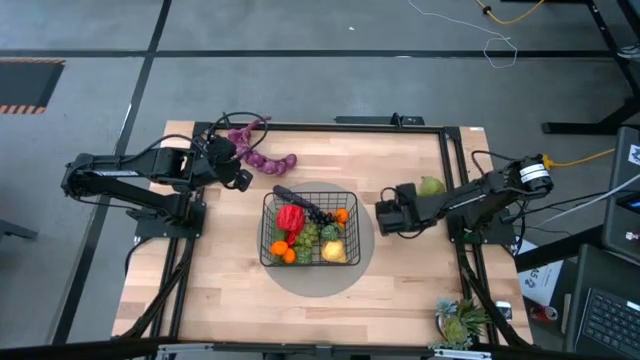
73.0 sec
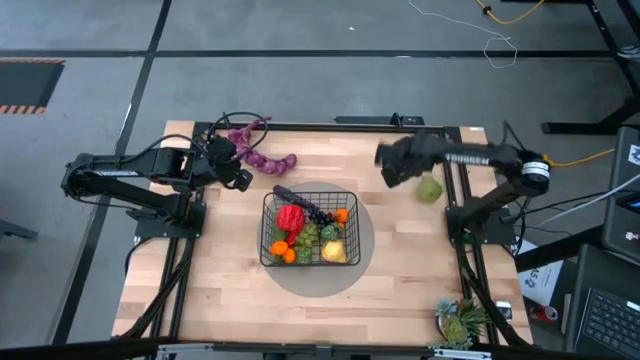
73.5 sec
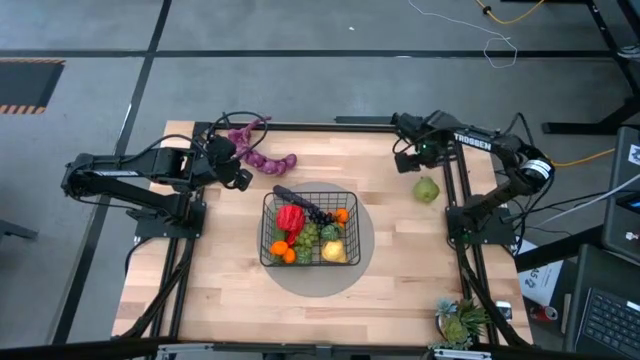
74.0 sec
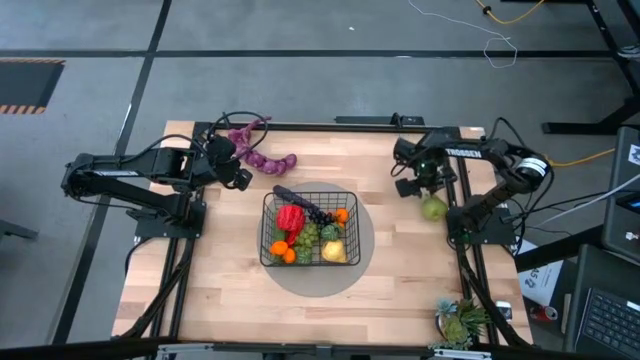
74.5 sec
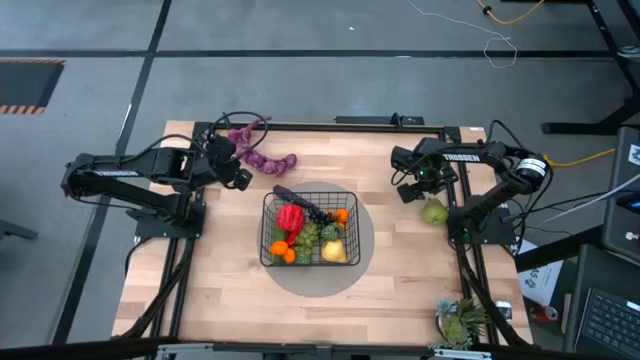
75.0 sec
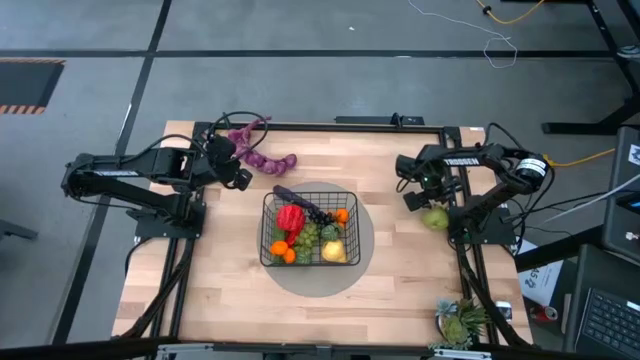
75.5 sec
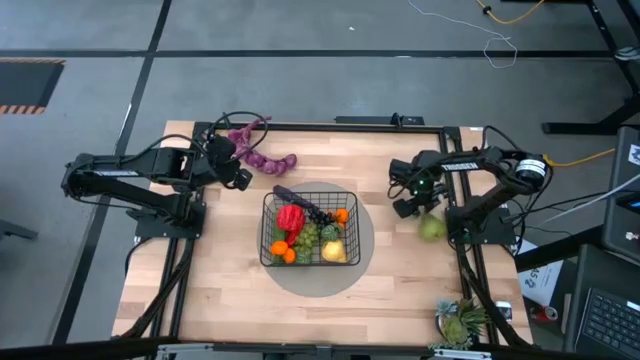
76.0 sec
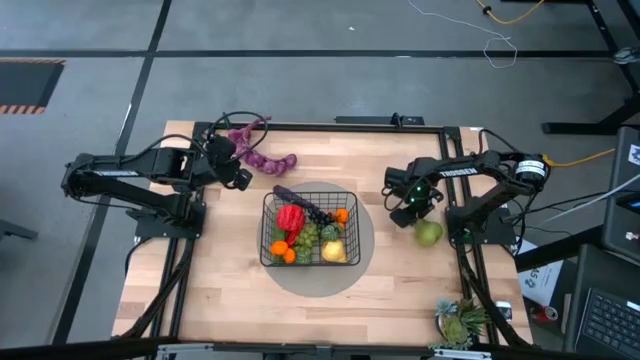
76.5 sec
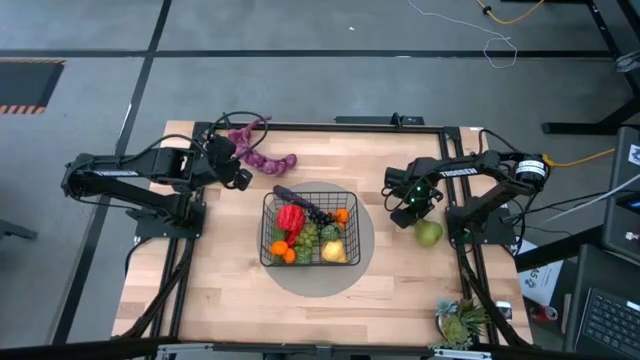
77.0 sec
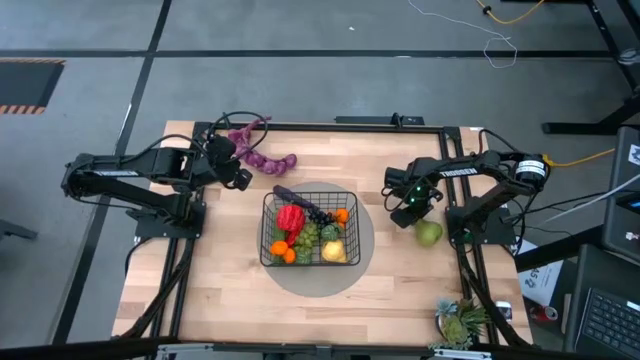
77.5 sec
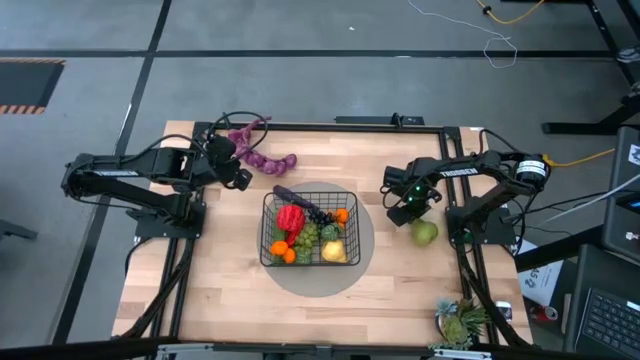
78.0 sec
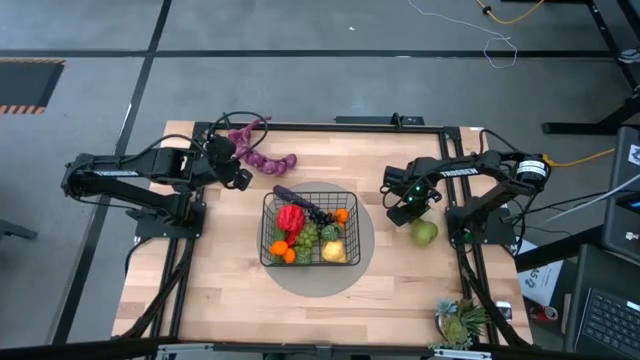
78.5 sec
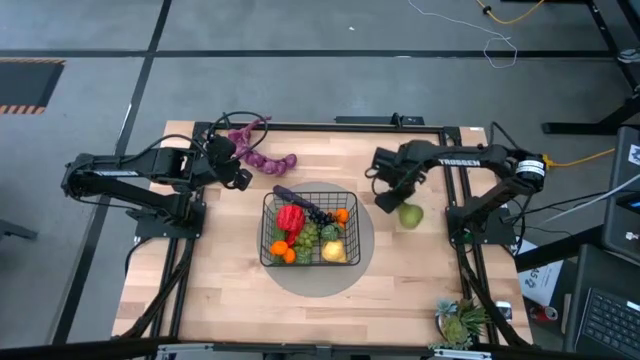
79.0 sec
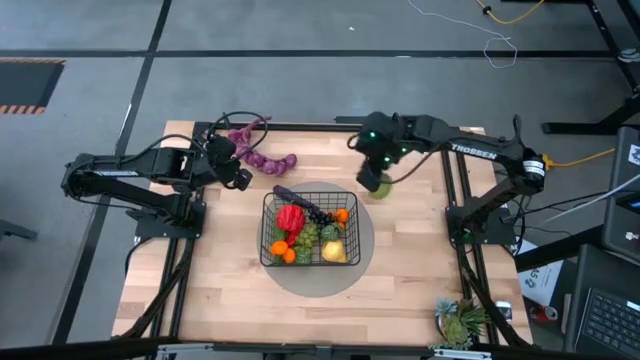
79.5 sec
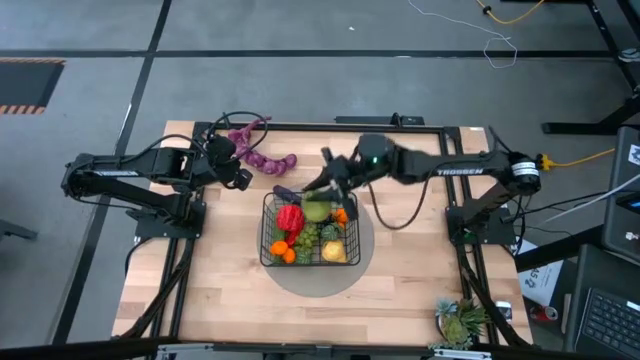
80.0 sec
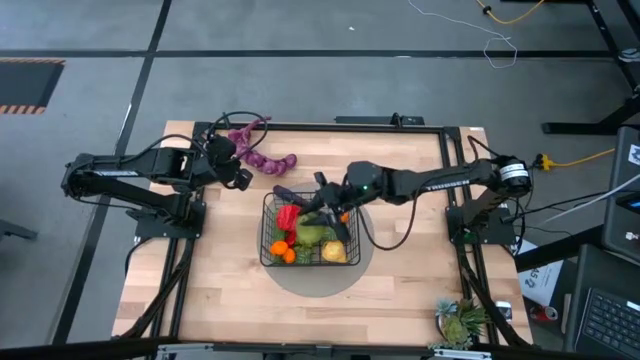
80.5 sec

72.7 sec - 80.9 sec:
Task: Build produce basket
Put the green pear into the black wire basket

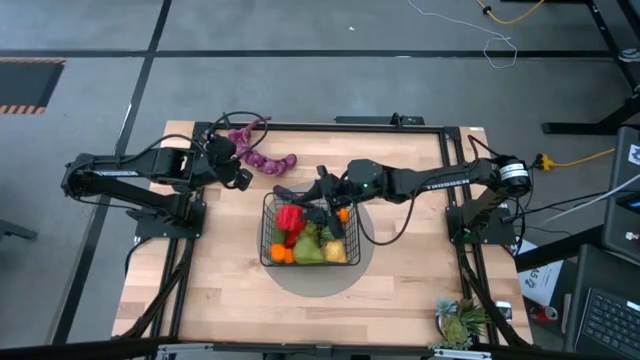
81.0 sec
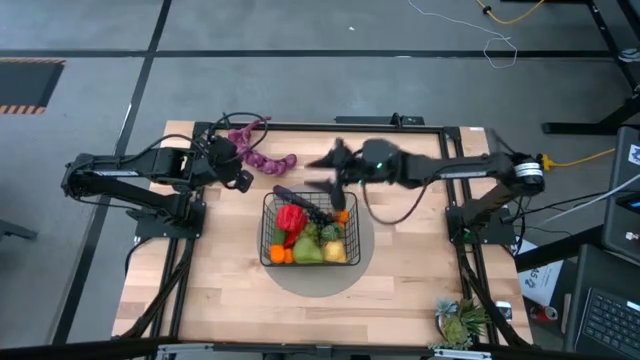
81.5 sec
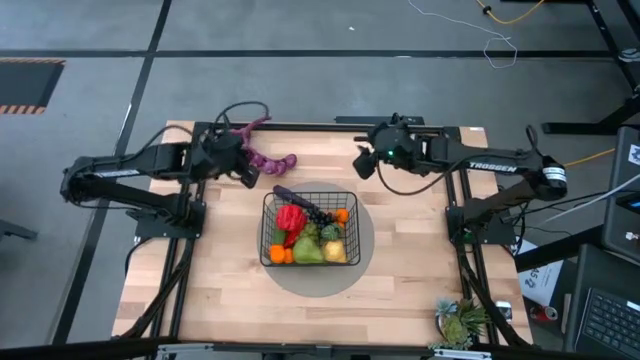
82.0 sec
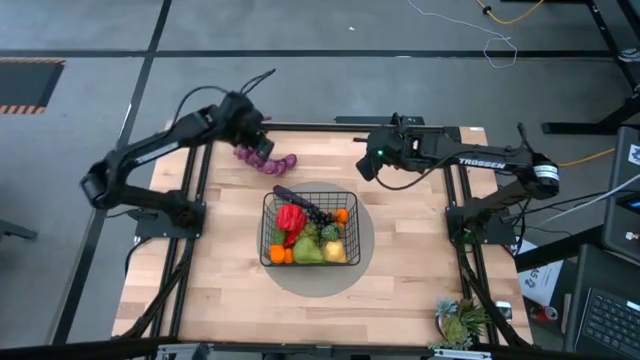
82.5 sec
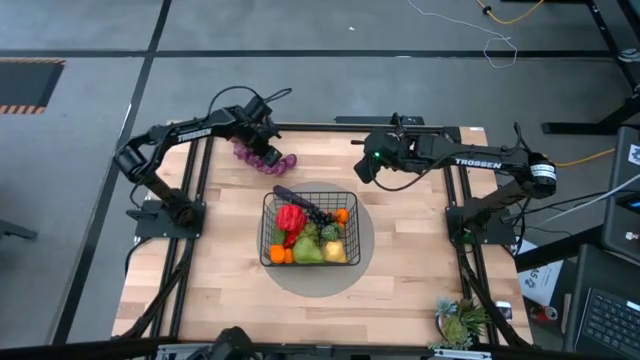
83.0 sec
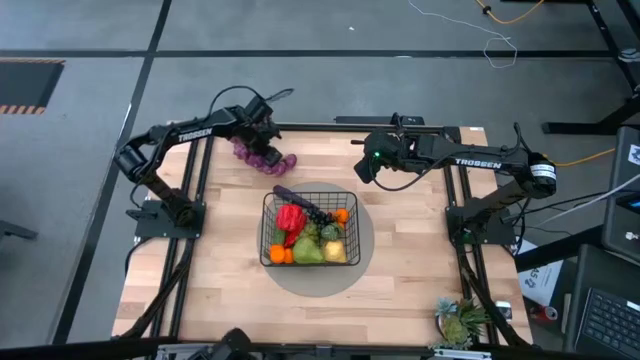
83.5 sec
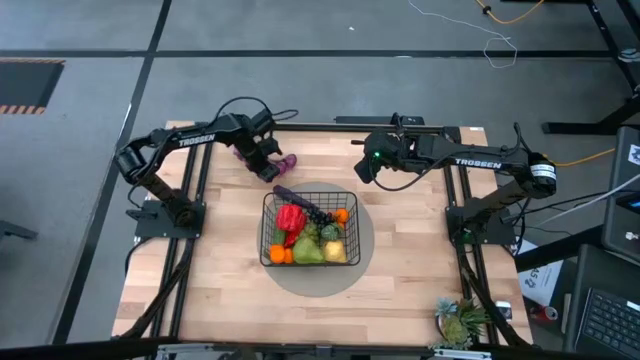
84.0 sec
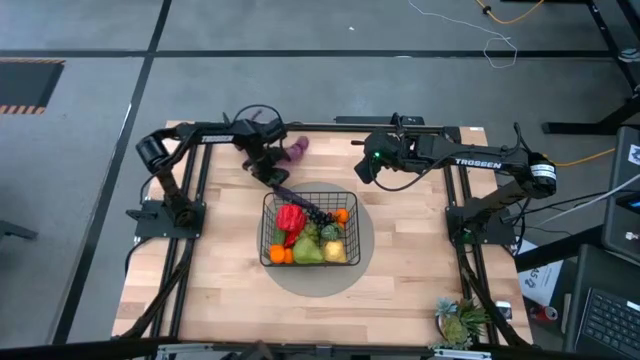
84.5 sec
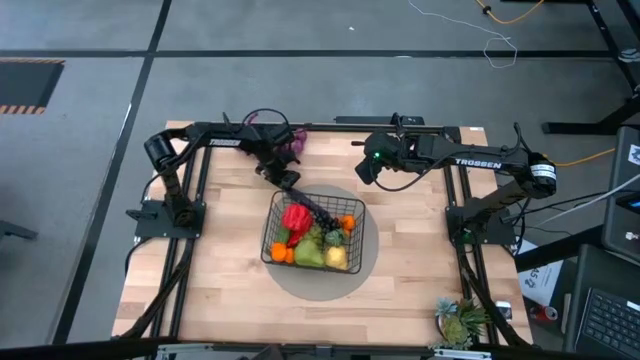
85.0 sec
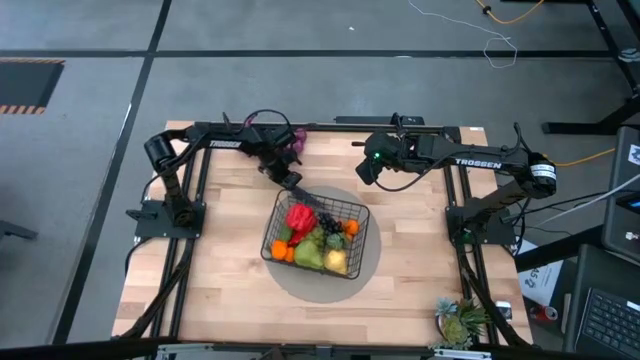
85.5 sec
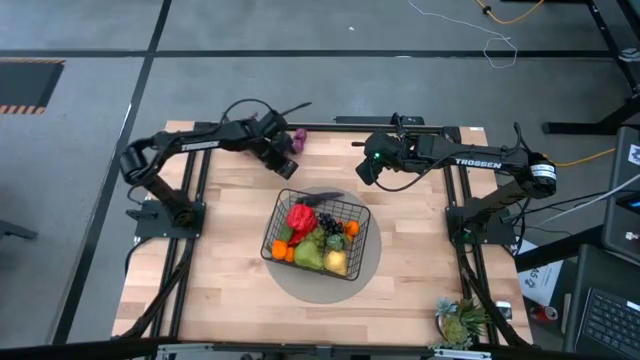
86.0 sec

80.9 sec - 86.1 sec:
Put the purple eggplant into the black wire basket

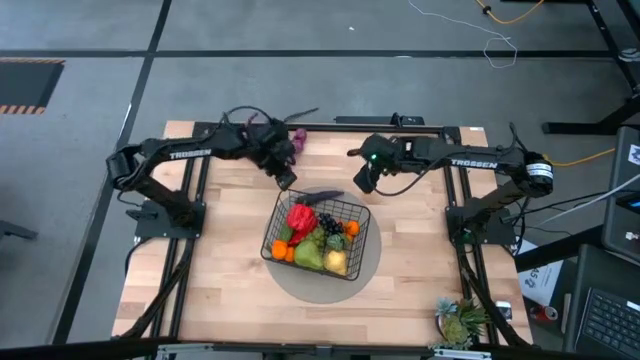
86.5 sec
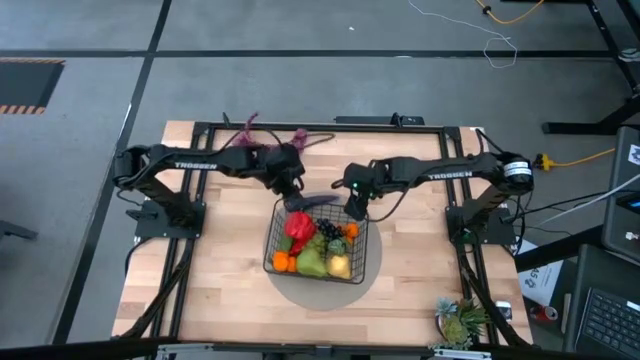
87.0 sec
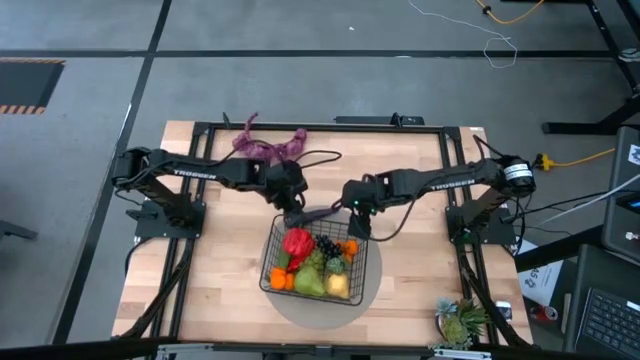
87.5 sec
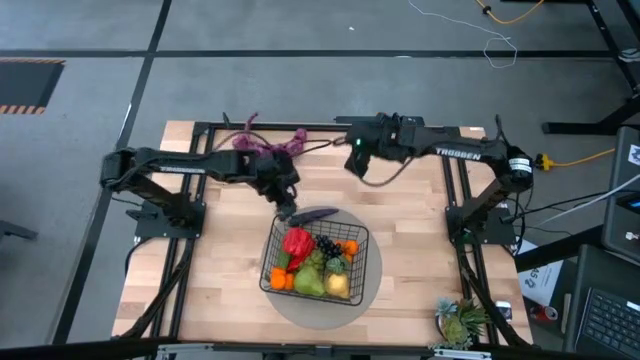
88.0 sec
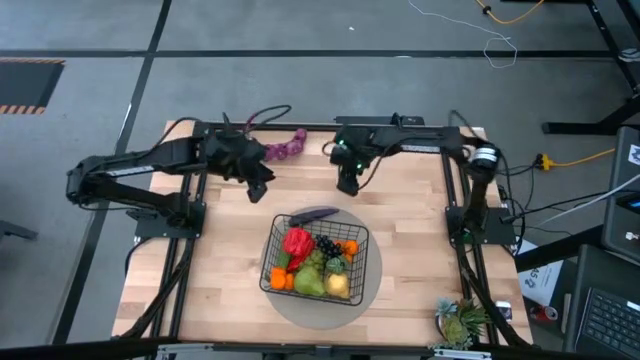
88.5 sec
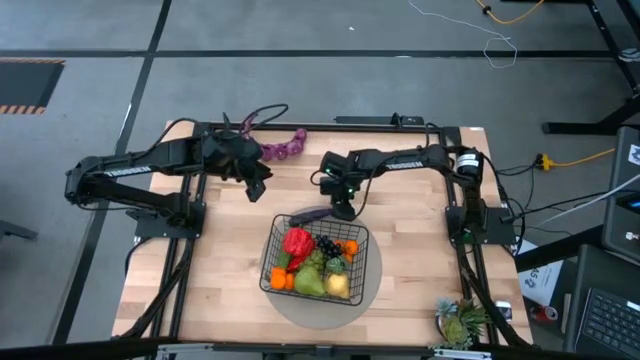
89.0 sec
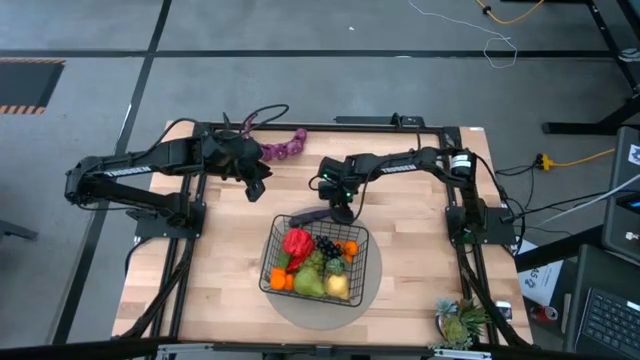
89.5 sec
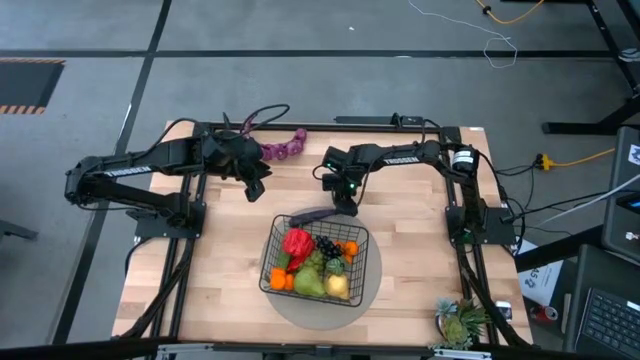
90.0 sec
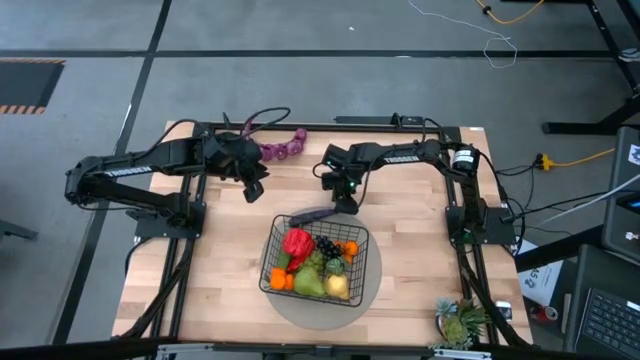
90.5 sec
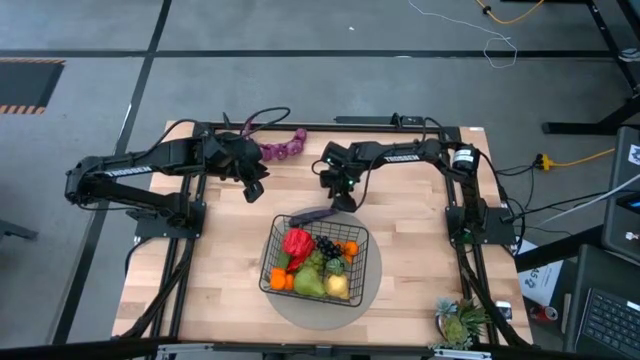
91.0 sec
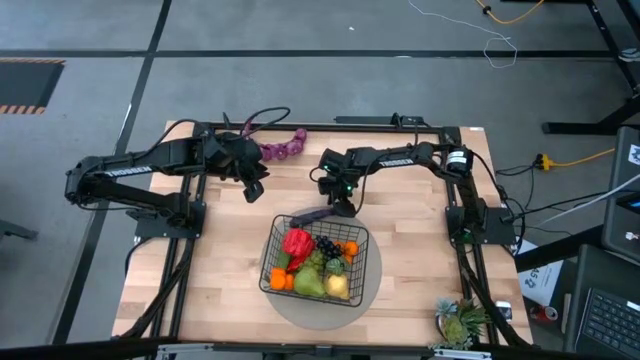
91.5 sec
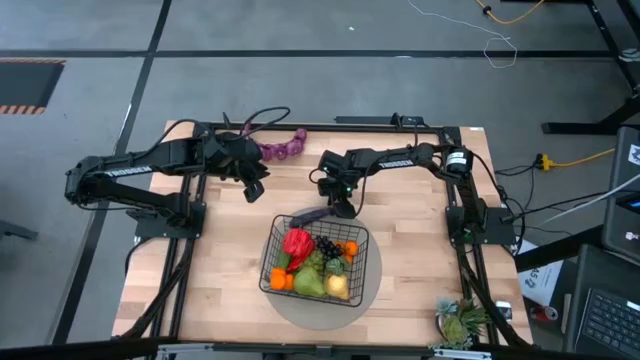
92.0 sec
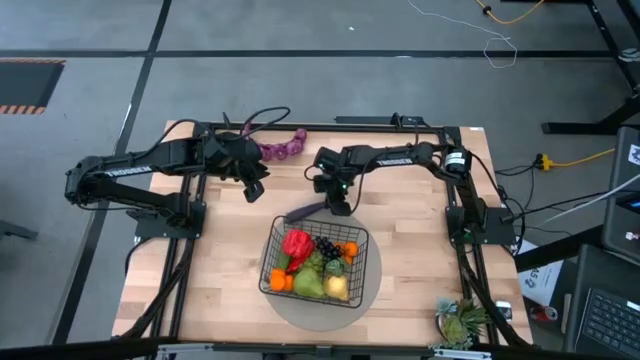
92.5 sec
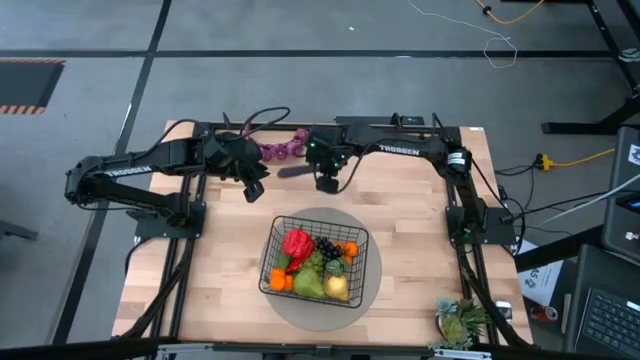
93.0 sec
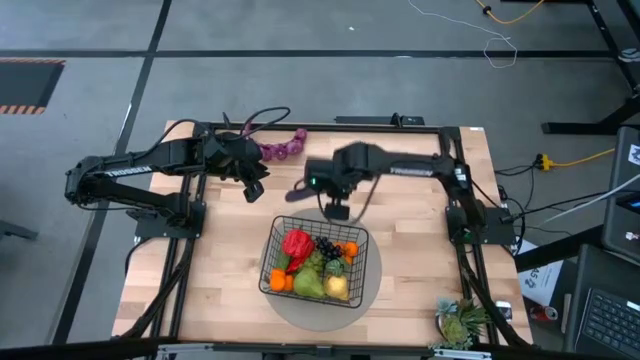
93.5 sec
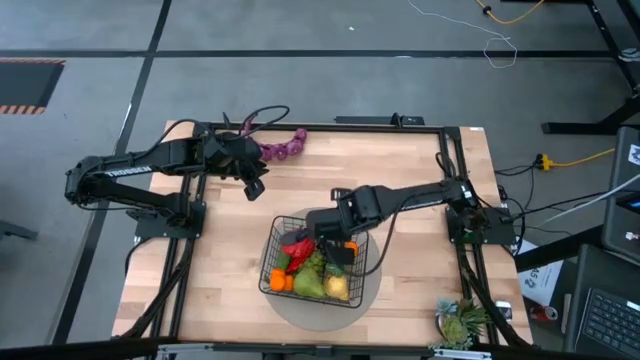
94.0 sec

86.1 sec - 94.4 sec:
Put the purple eggplant into the black wire basket
